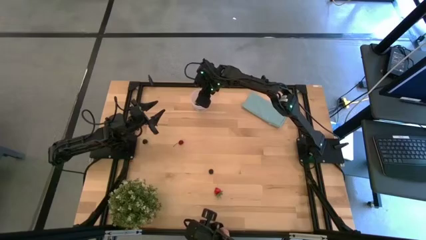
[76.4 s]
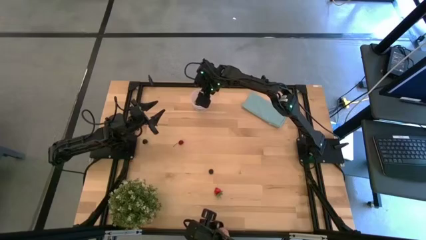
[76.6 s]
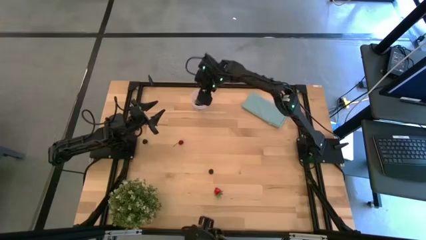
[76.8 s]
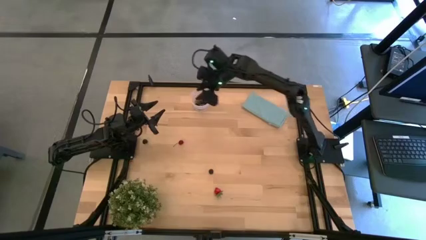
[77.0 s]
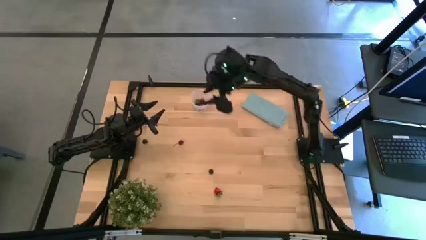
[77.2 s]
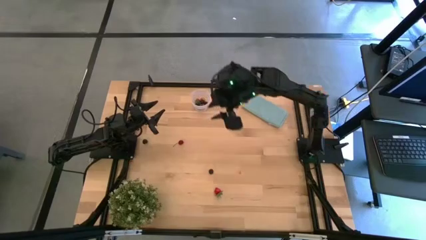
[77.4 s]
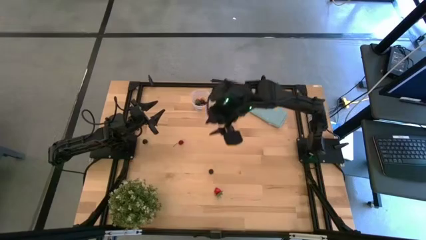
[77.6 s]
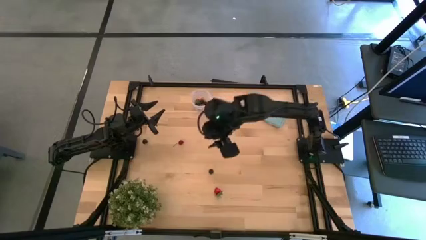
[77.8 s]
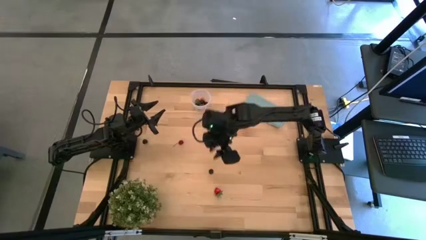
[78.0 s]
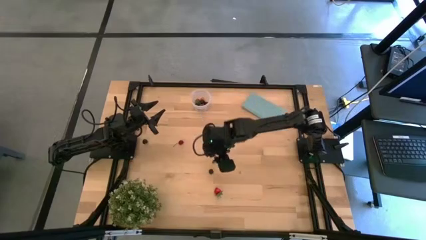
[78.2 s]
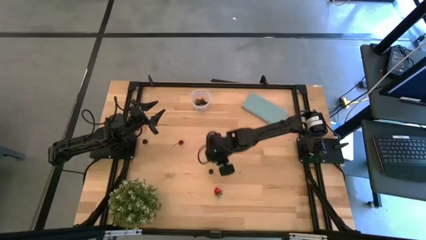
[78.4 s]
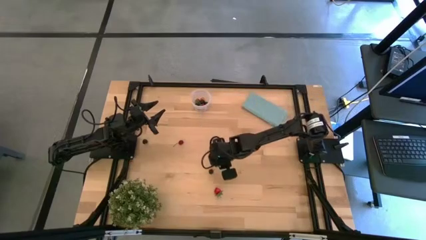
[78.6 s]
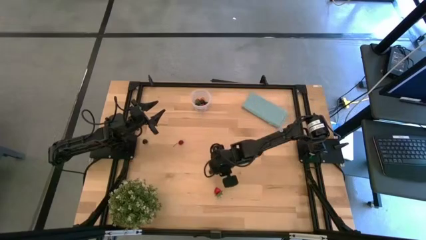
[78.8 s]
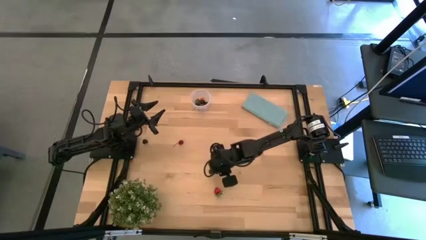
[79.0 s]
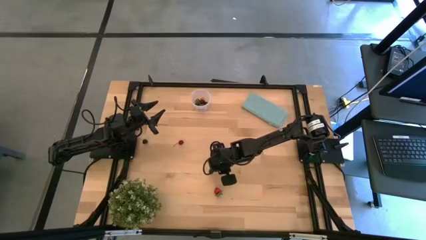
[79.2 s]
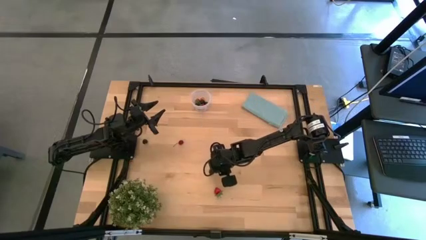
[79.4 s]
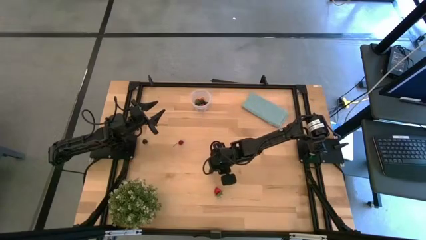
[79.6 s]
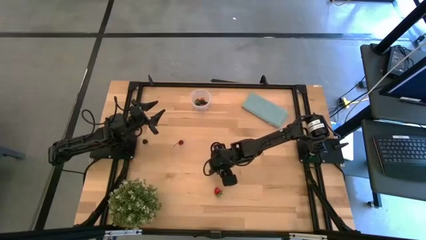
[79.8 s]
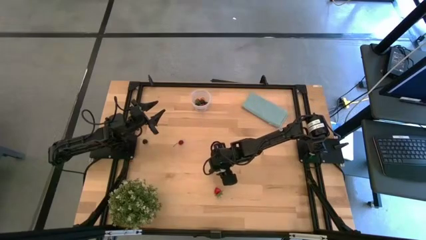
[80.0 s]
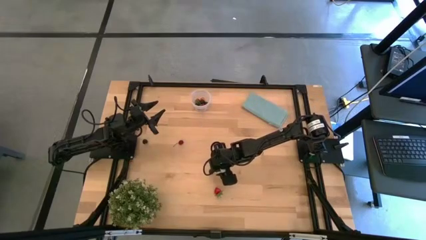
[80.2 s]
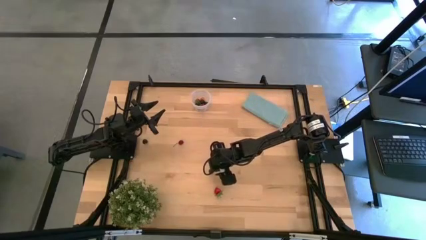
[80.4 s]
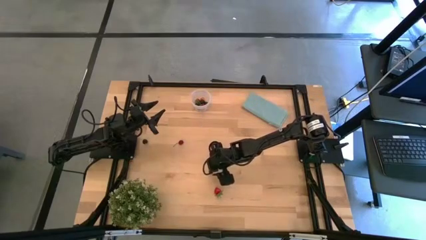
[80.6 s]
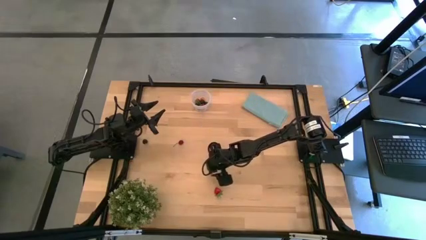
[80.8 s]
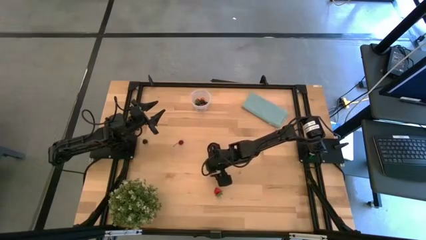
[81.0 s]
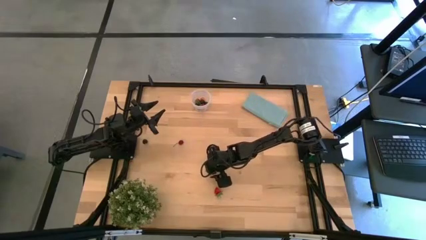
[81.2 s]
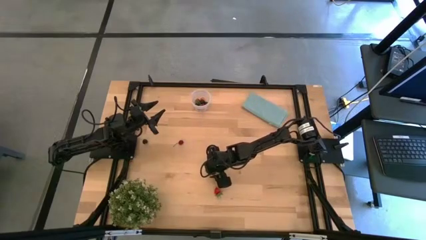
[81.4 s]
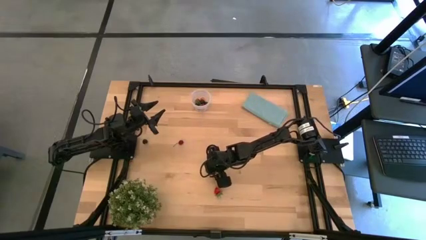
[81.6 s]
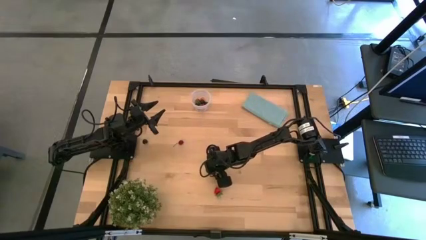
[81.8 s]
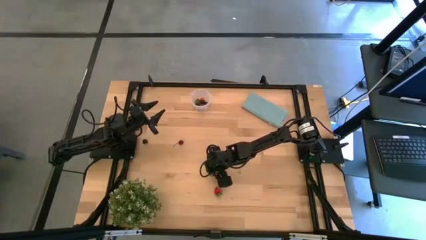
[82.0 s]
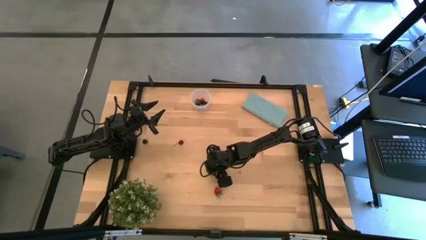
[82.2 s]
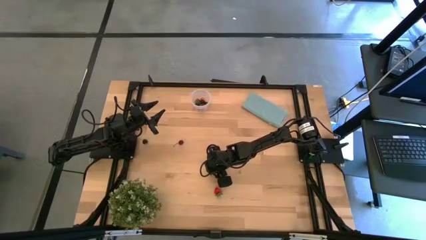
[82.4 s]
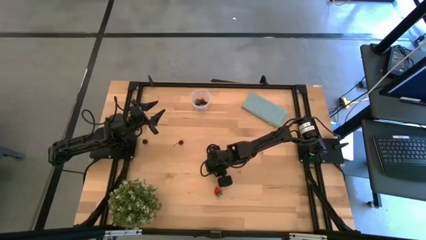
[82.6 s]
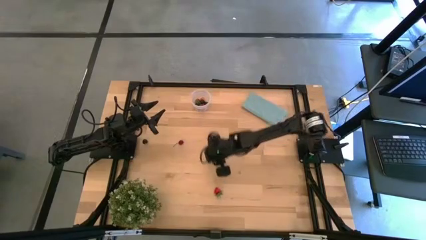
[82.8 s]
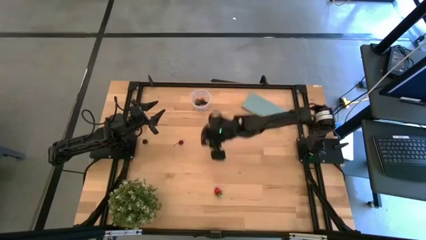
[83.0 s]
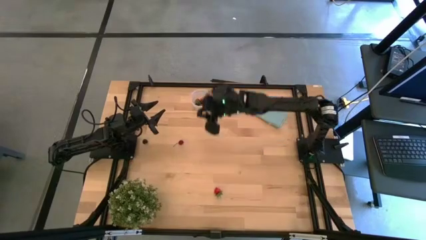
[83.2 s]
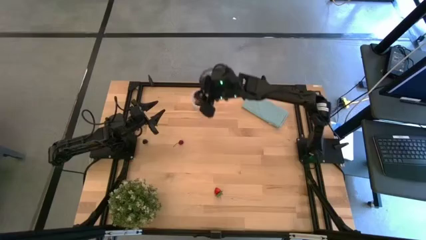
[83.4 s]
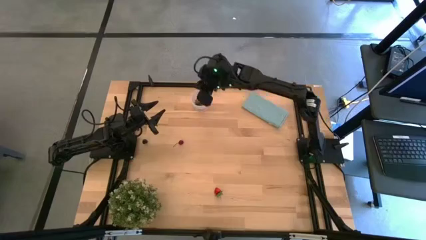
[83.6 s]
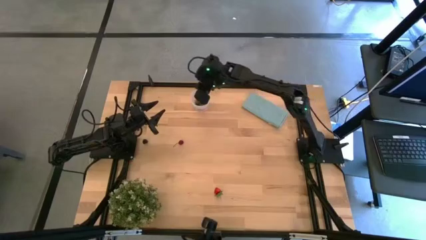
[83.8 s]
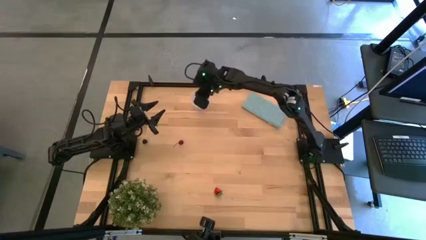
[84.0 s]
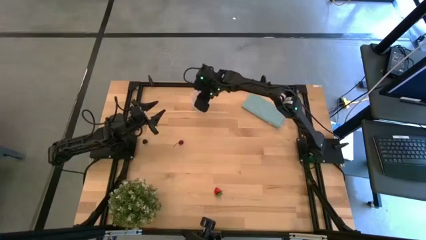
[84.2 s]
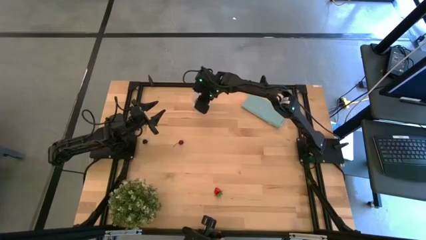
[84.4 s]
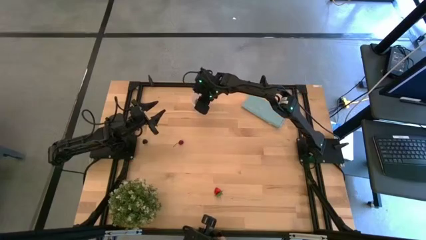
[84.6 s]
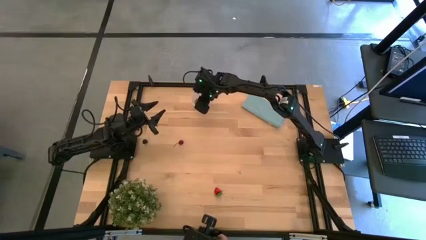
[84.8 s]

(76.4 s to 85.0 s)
Task: Pick and placing Produce into tupperware
Put the black raspberry into the transparent container

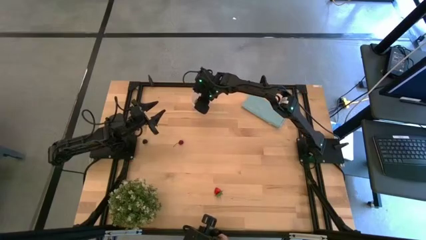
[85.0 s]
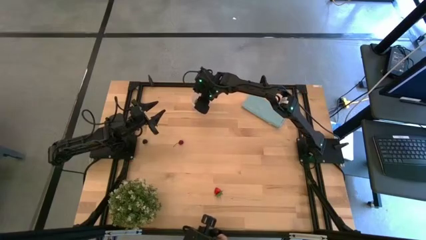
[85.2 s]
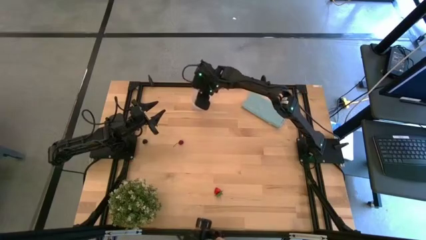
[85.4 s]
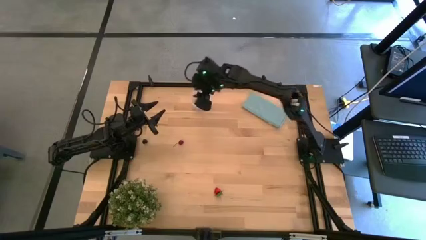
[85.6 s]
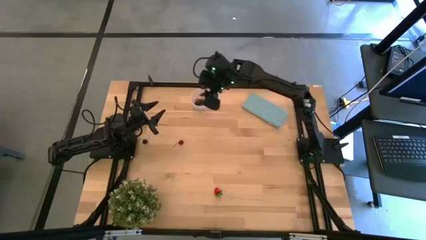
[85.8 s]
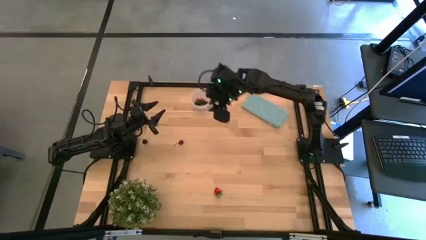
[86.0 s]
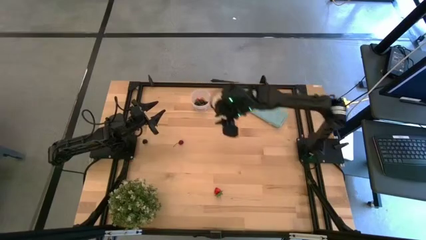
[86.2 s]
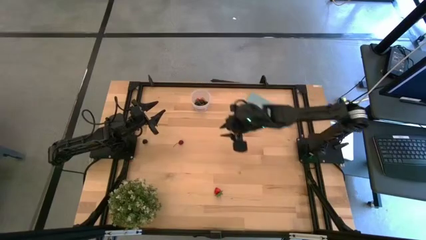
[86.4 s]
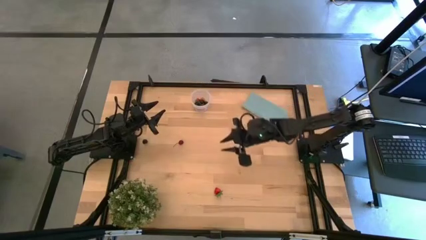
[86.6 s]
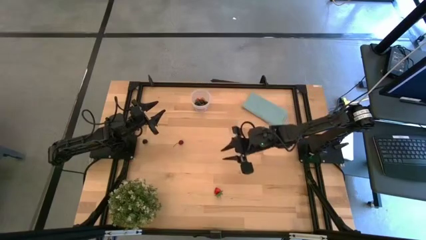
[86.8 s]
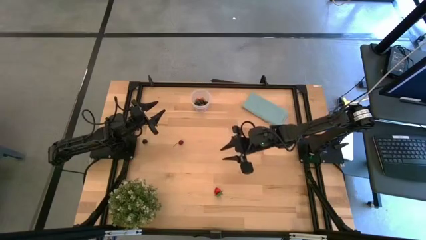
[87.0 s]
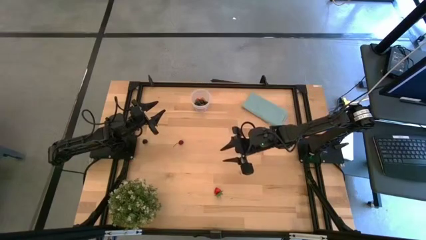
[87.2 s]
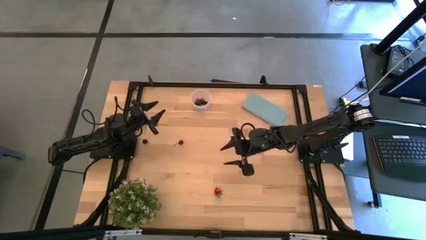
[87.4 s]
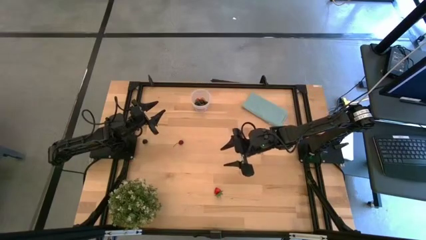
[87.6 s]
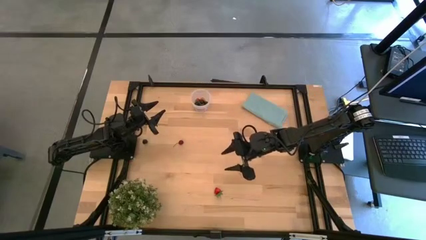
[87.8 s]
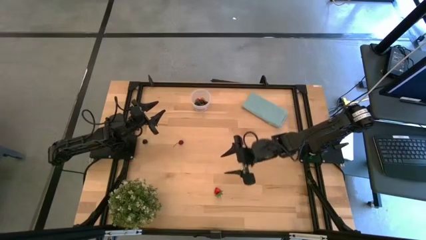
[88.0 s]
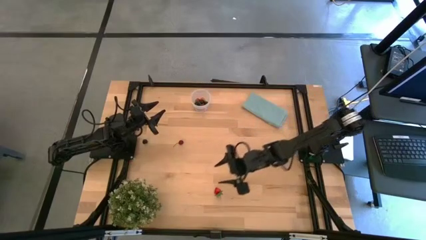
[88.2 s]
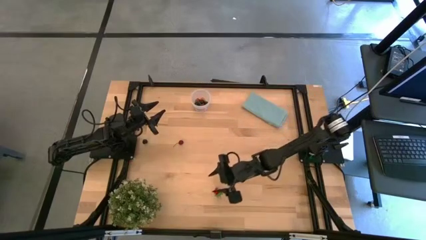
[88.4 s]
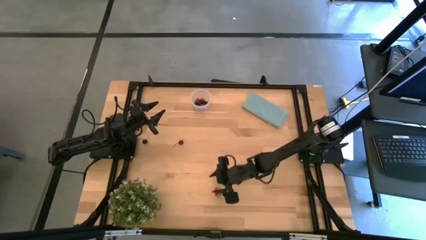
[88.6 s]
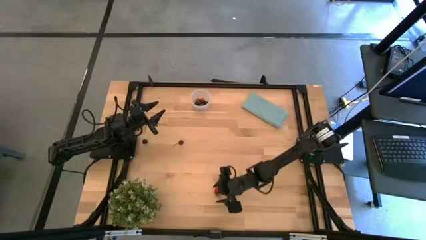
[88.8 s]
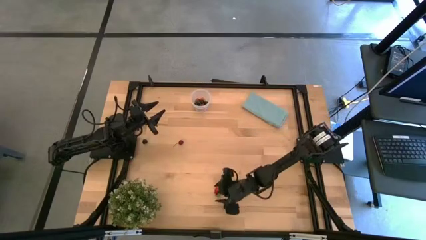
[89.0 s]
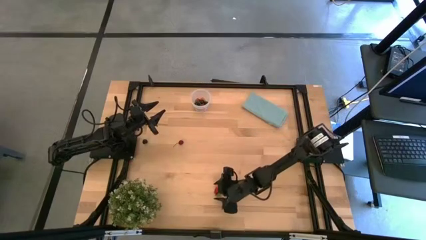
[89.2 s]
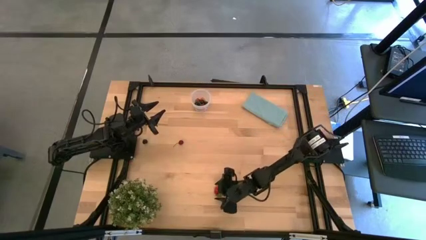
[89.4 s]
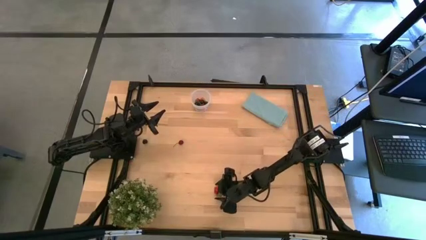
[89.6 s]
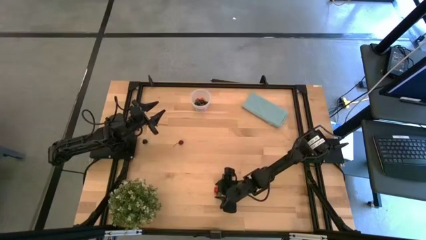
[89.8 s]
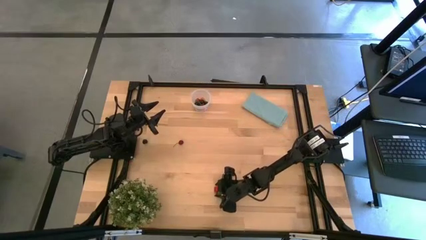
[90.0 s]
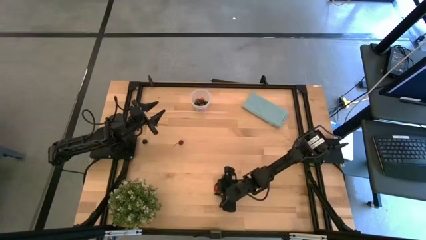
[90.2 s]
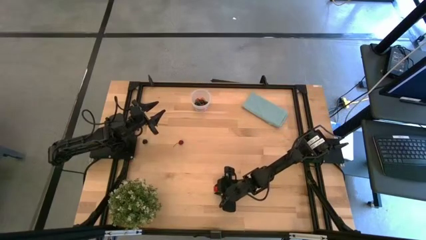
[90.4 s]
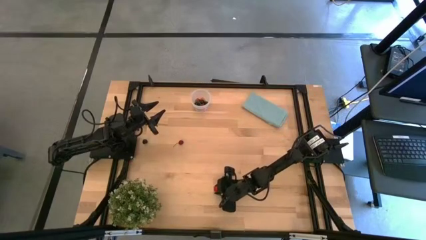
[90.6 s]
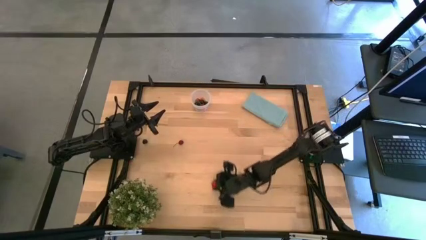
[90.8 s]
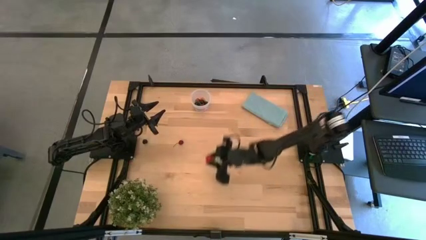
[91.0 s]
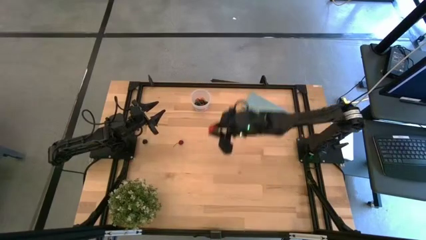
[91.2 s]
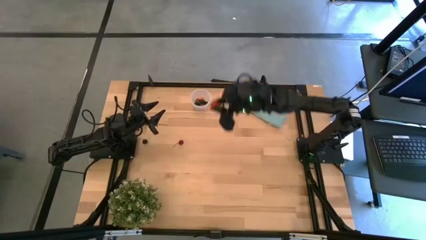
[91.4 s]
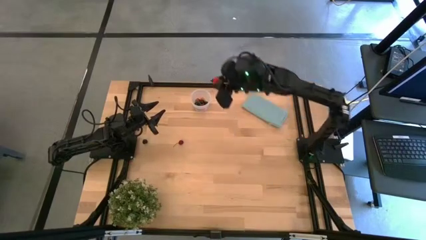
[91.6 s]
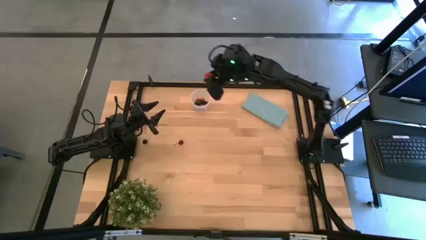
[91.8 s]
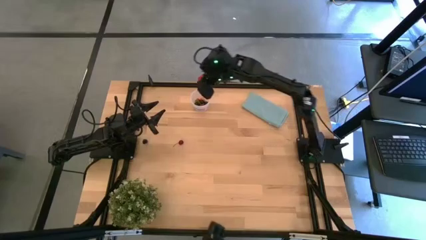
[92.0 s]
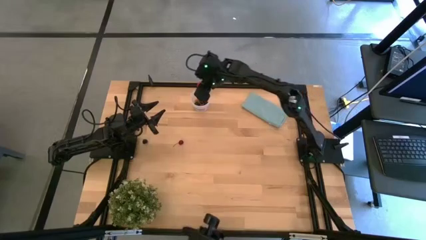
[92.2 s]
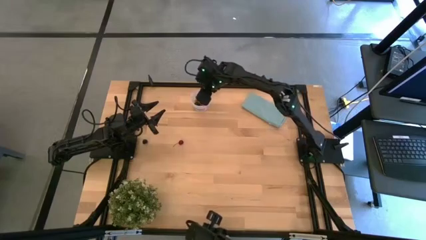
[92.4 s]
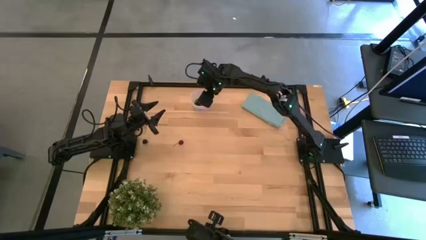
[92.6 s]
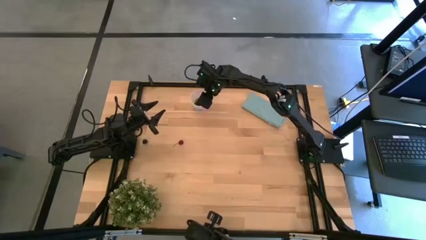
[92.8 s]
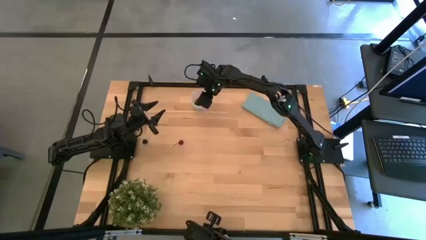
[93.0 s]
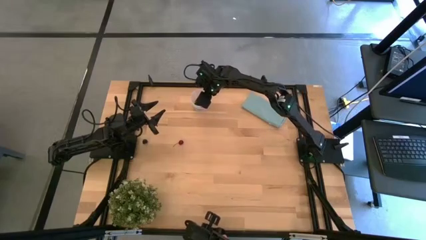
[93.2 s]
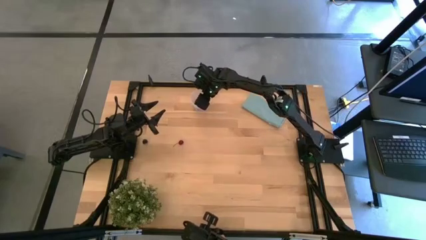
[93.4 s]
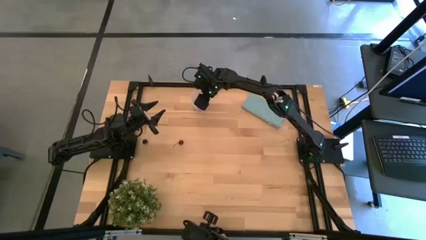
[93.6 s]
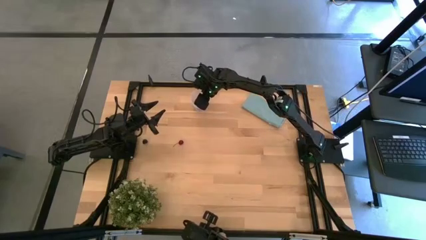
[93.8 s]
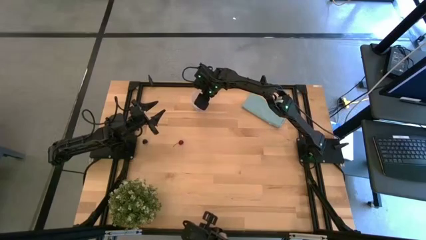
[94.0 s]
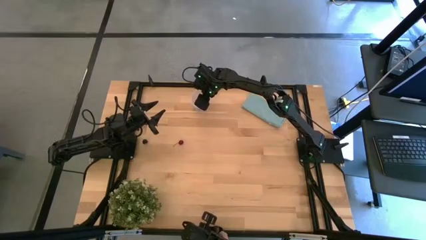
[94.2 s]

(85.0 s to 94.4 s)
Put the red strawberry into the transparent container
